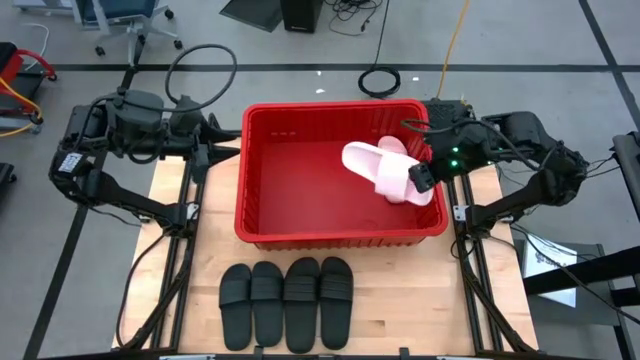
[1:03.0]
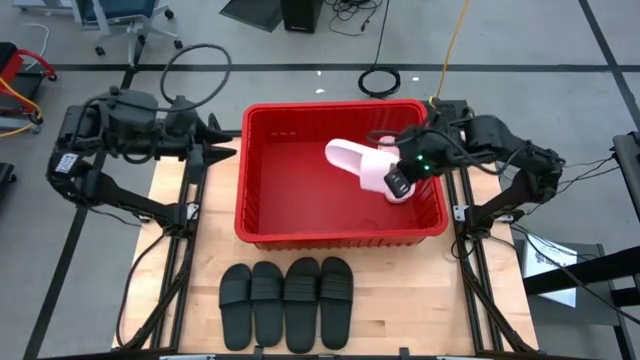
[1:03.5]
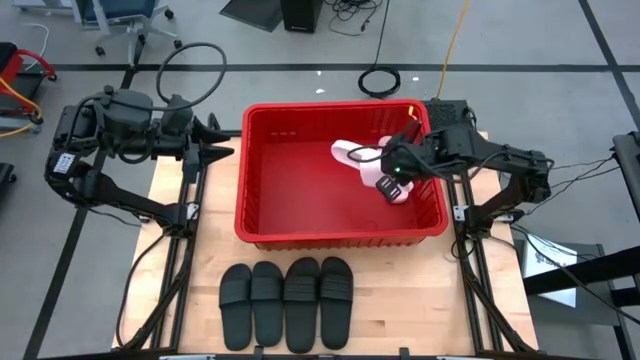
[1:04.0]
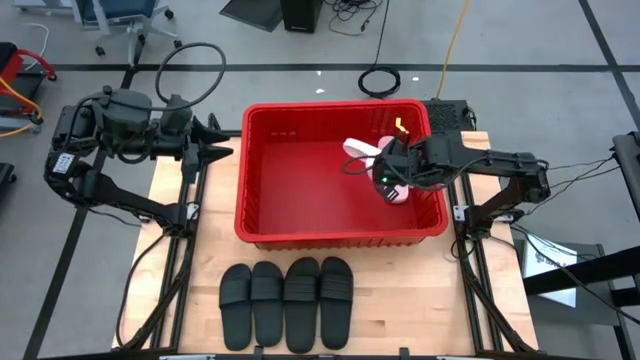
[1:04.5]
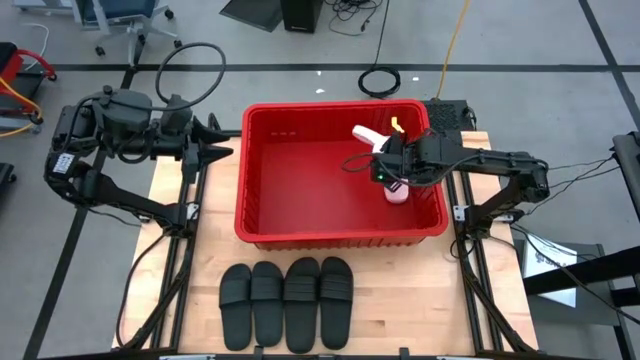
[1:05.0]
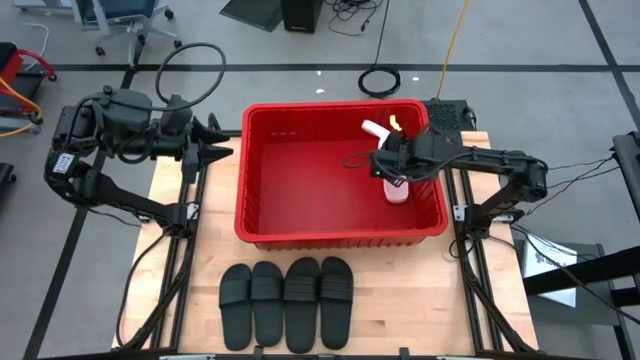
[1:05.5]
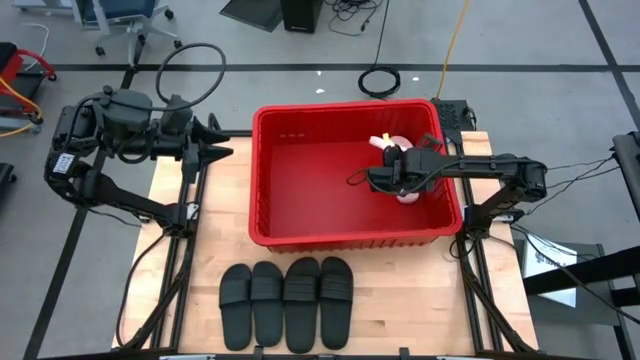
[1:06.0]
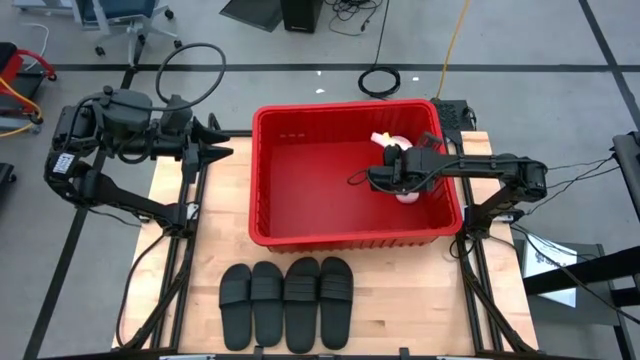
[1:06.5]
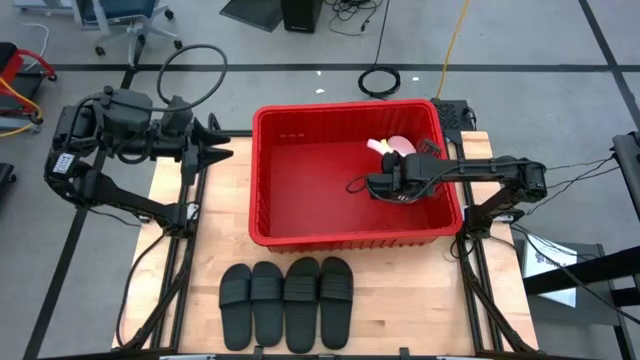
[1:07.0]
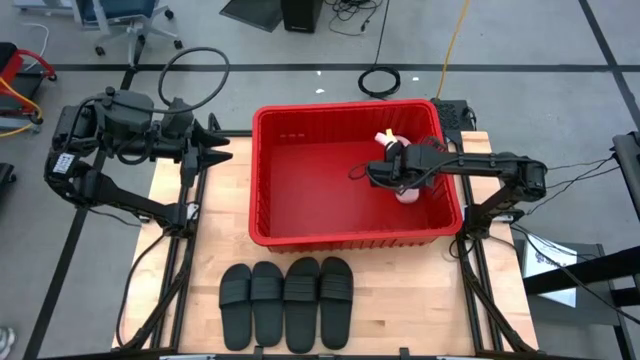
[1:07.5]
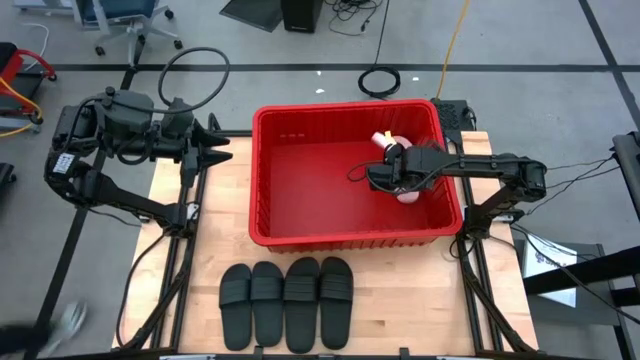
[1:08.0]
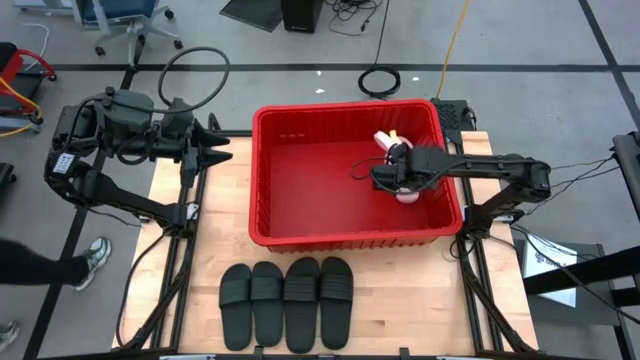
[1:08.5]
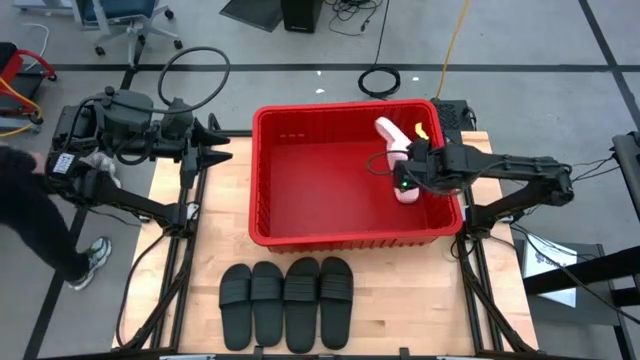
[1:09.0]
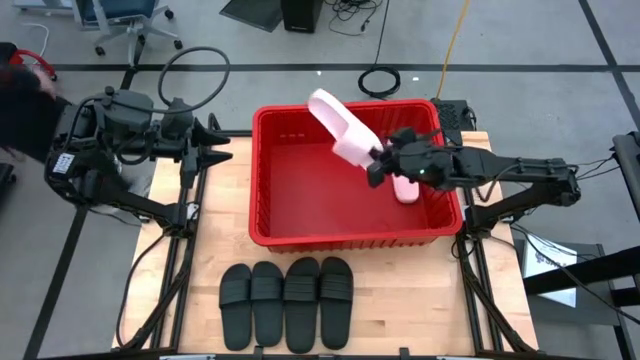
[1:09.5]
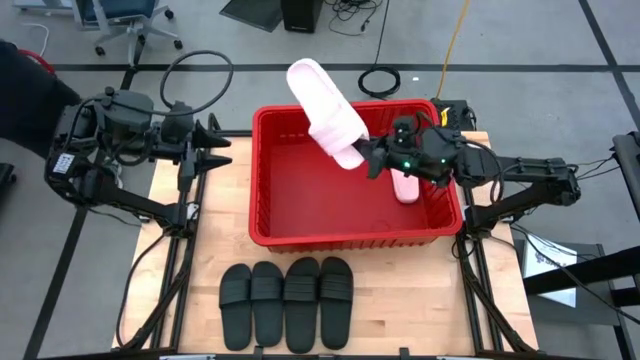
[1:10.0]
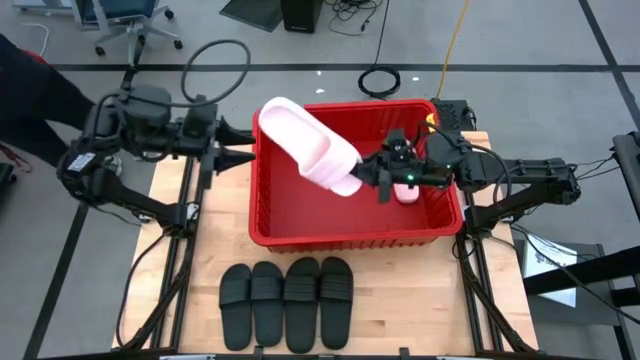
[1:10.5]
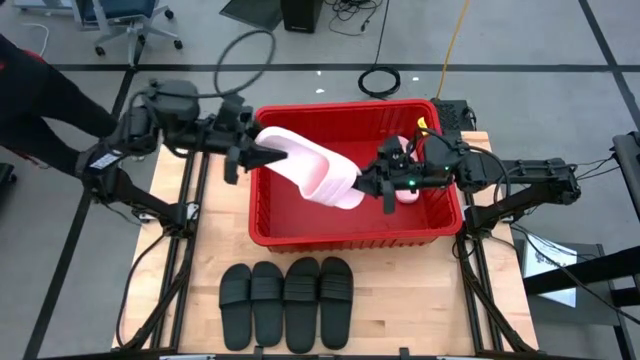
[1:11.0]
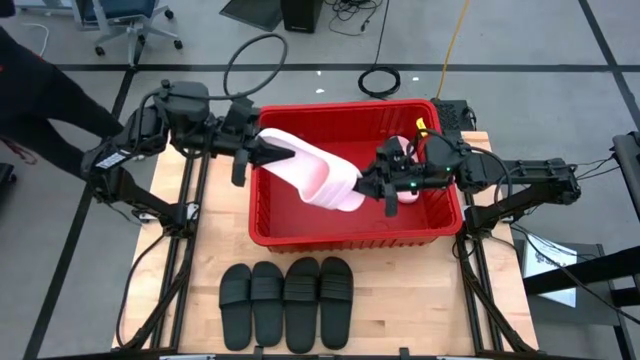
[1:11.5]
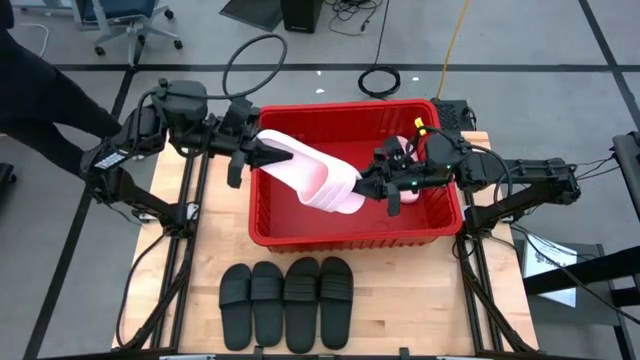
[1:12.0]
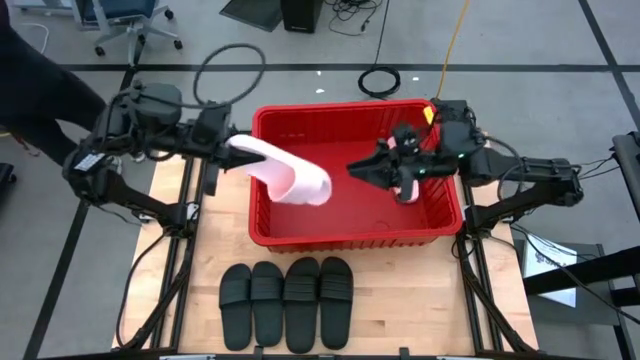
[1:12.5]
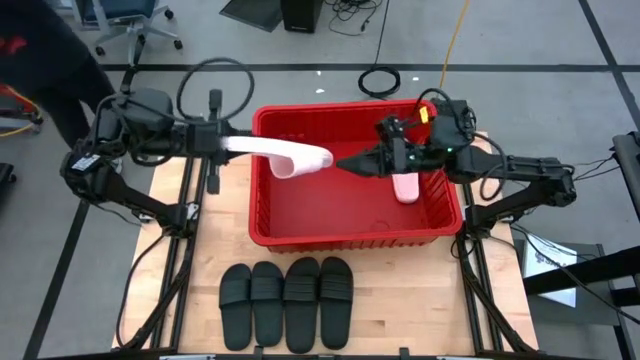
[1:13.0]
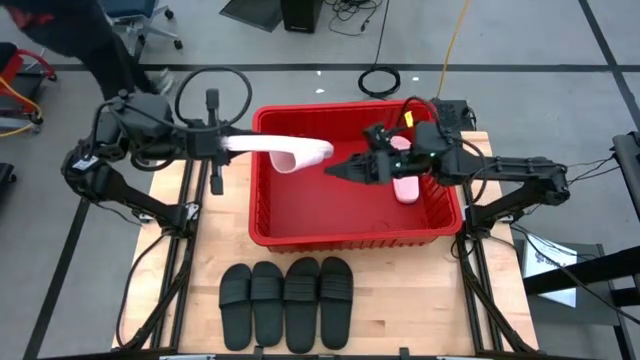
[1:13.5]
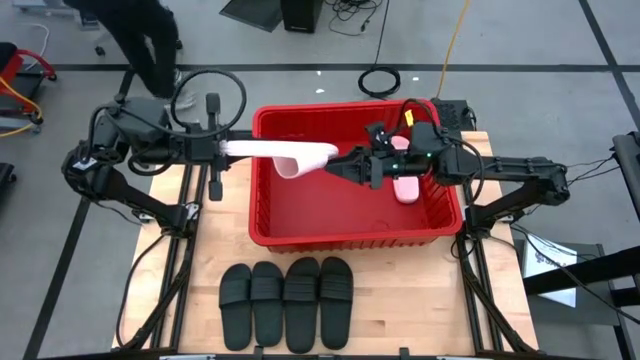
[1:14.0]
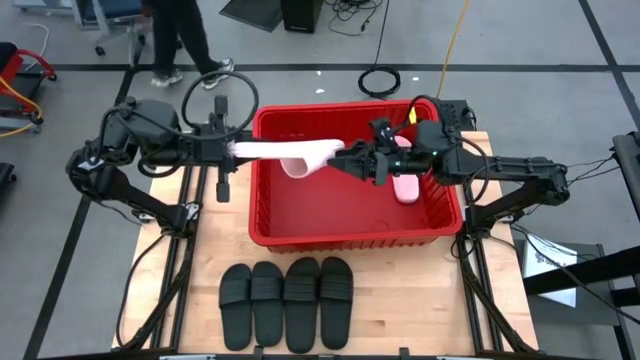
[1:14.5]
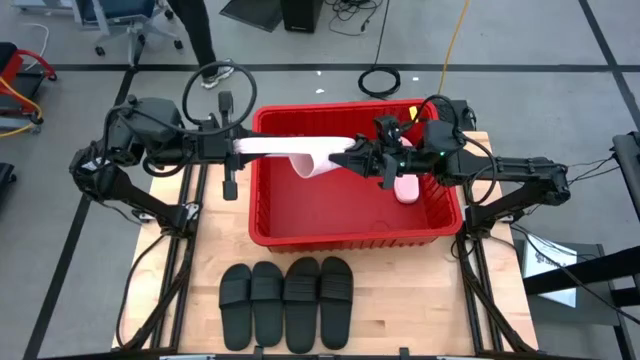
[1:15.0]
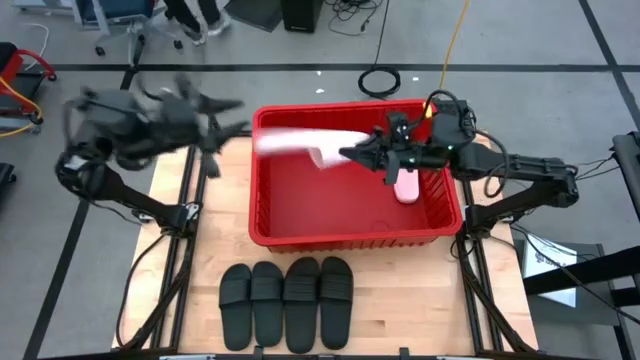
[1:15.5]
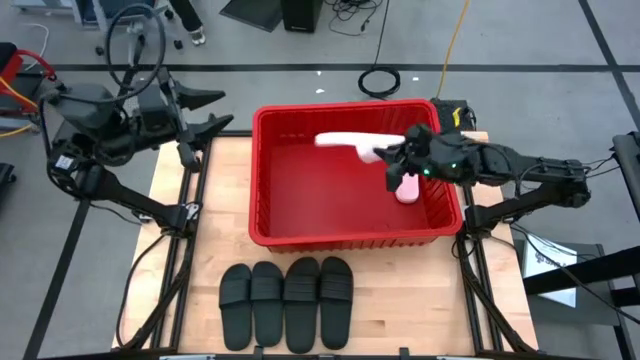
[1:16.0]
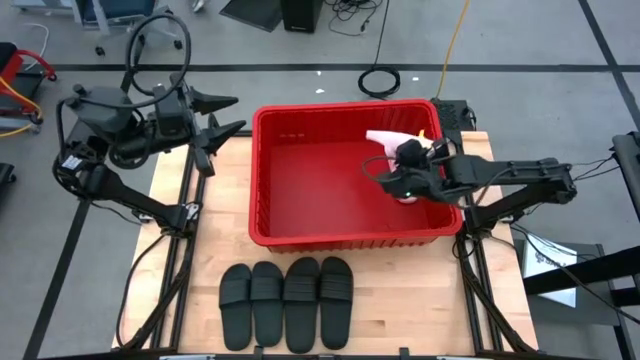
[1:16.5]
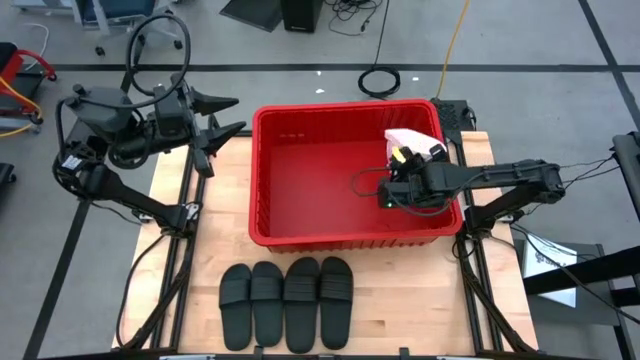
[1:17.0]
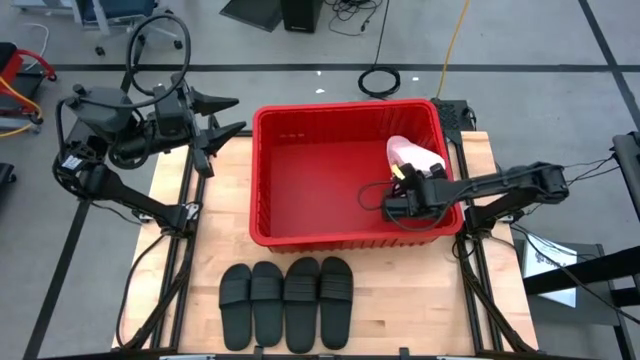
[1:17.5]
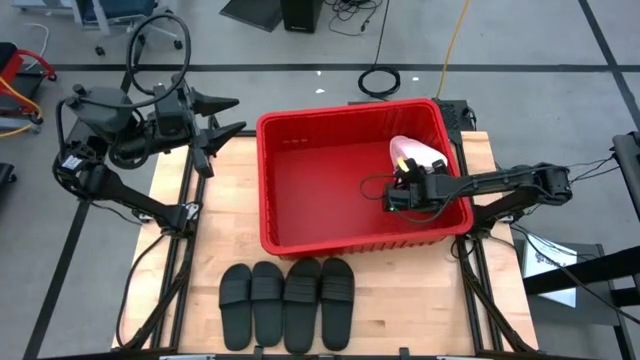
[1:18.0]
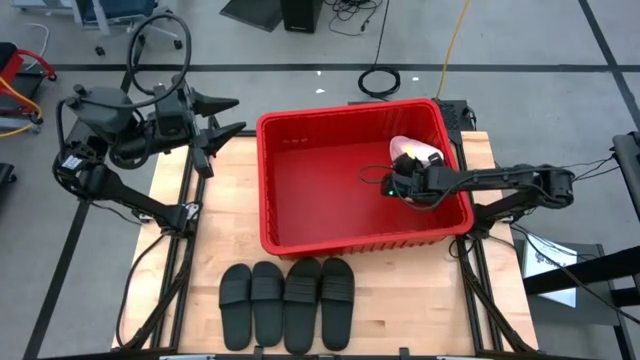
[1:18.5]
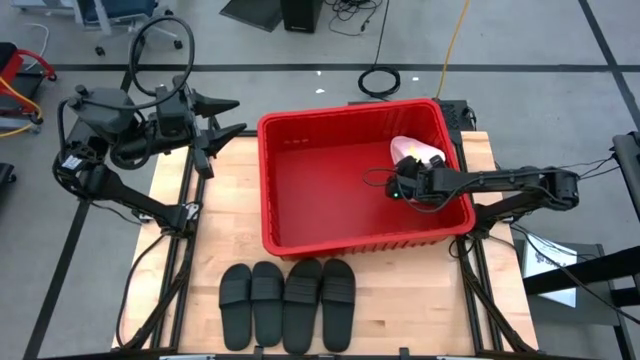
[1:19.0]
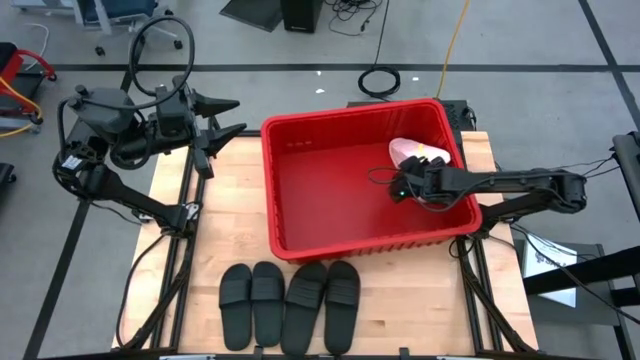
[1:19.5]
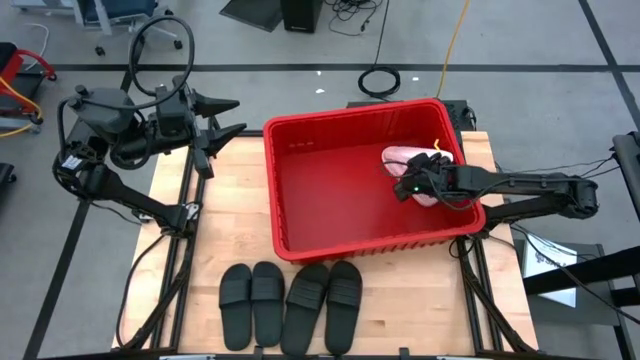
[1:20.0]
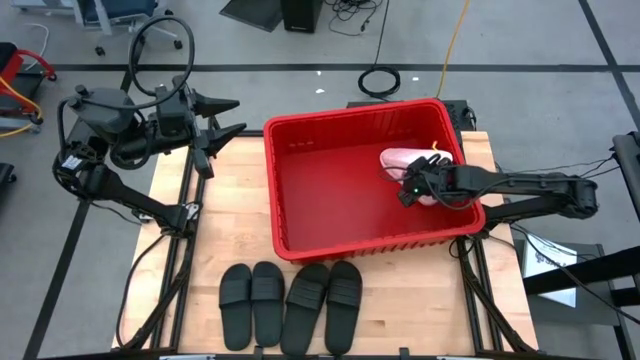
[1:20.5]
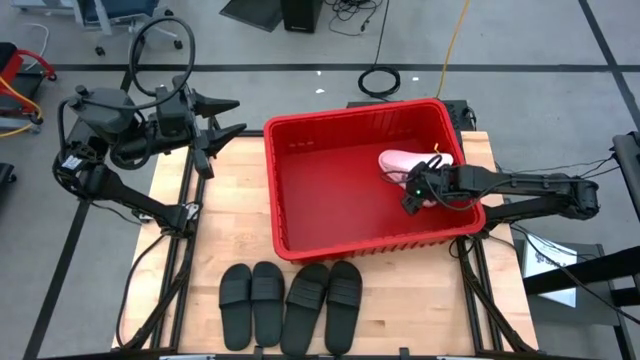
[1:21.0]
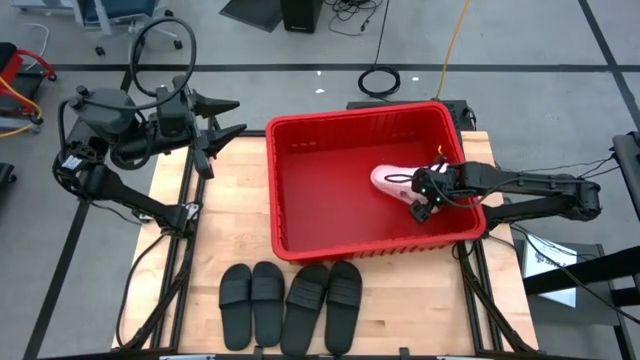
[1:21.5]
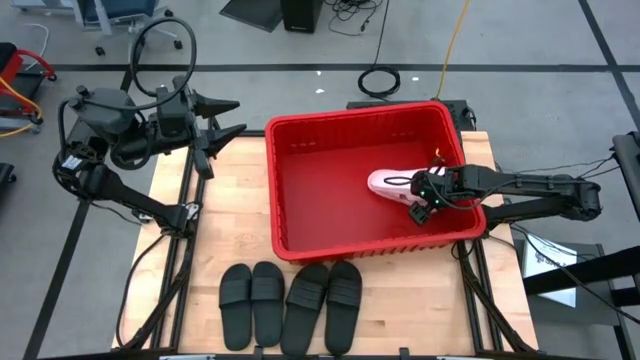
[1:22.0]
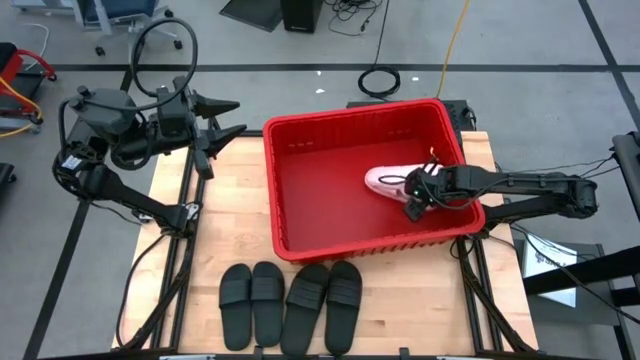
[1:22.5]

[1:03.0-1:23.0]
Task: Pick and place slides into bin
Stack the pink slide on top of the pink slide in the red bin

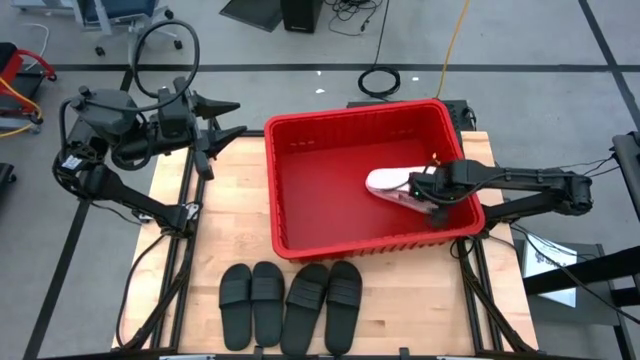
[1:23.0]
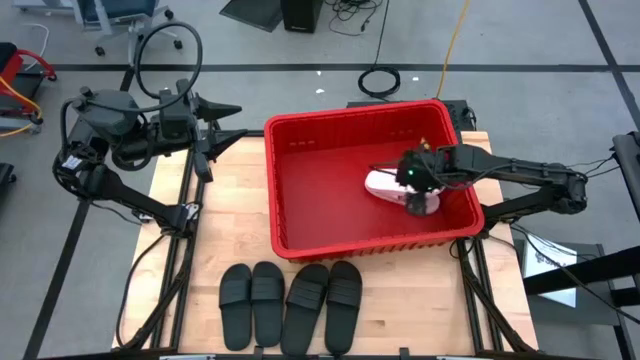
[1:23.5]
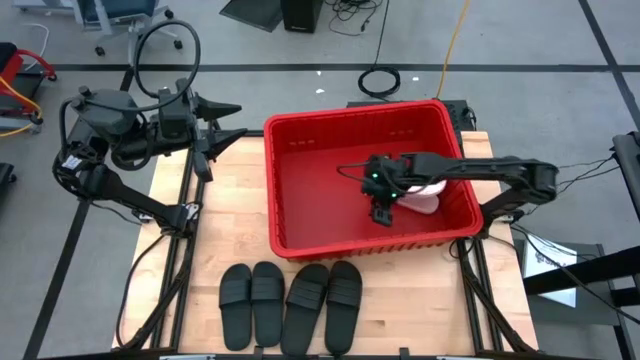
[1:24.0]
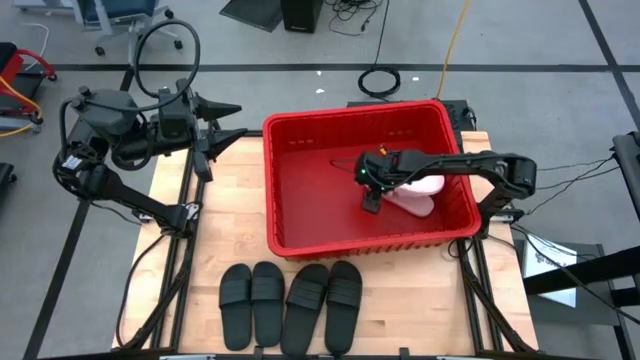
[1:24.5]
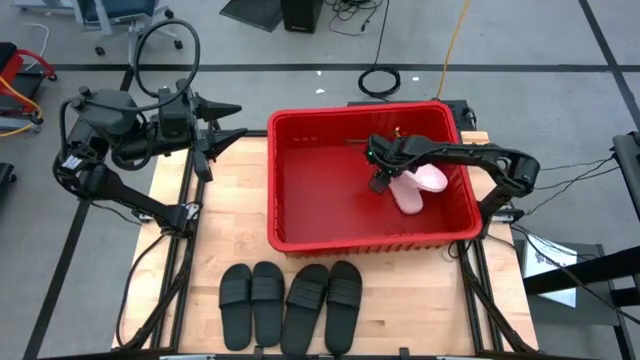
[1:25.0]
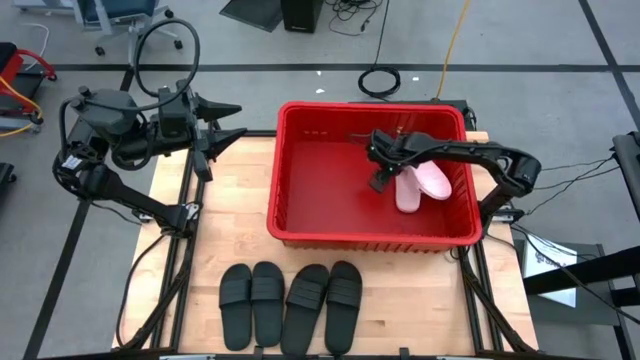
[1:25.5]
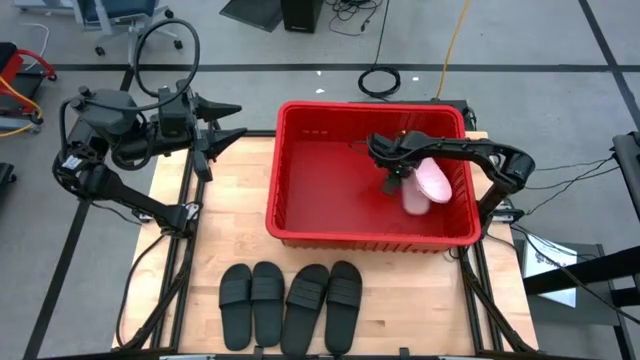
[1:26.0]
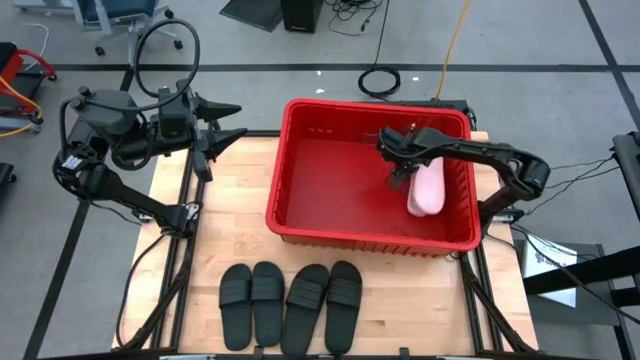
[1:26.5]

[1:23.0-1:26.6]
Adjust the stacked pink slides in the red bin
